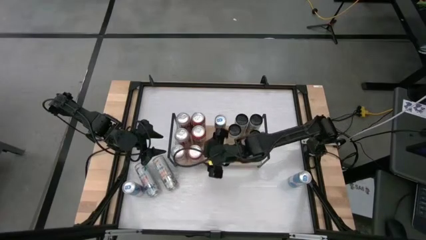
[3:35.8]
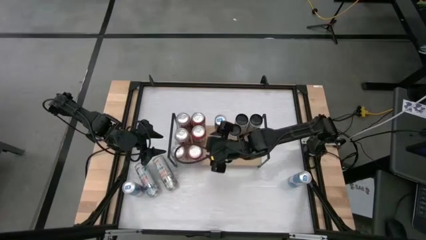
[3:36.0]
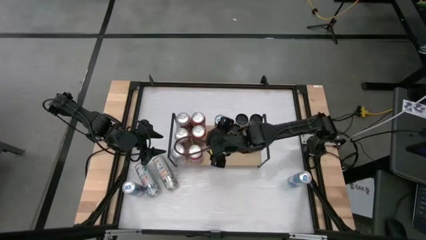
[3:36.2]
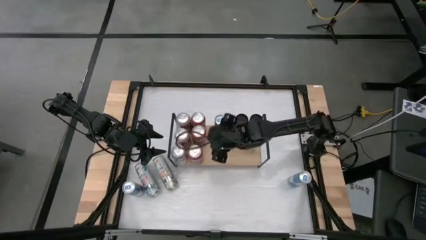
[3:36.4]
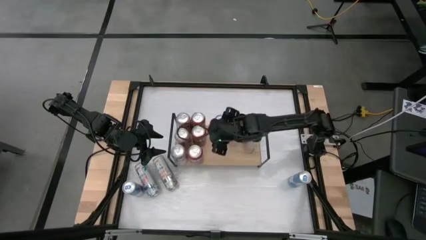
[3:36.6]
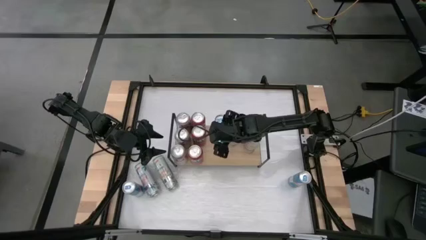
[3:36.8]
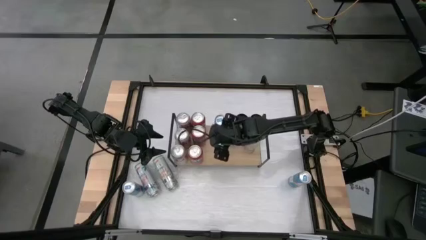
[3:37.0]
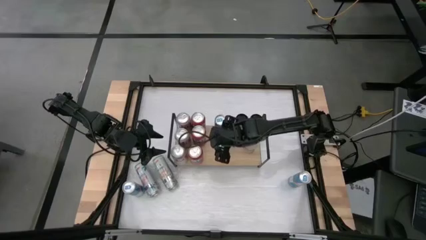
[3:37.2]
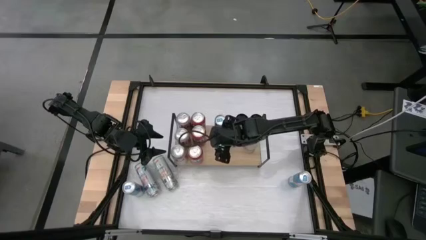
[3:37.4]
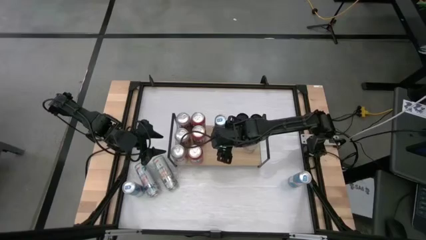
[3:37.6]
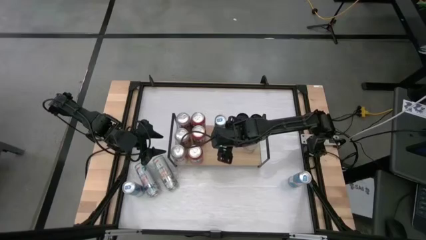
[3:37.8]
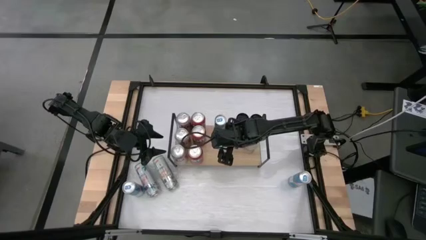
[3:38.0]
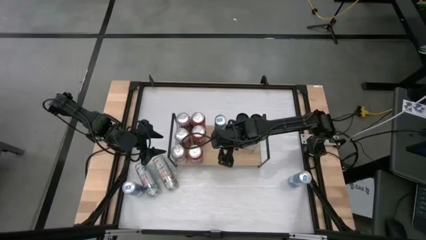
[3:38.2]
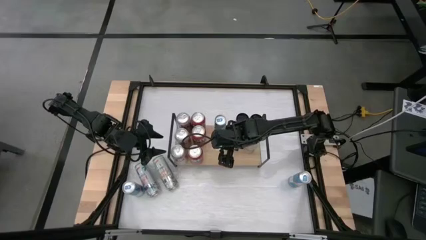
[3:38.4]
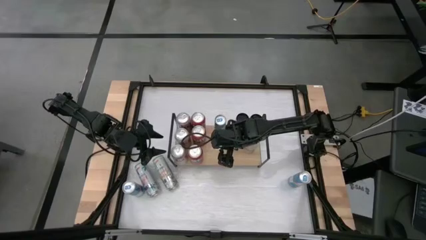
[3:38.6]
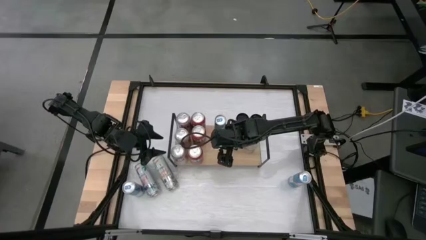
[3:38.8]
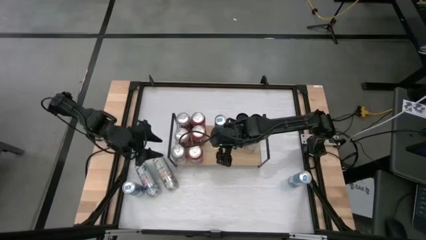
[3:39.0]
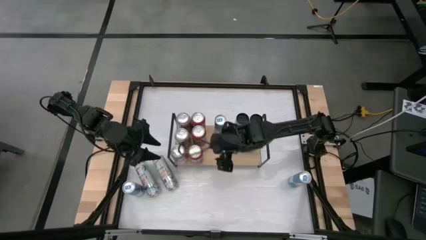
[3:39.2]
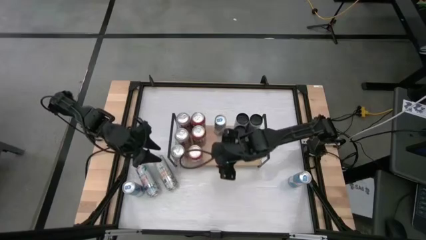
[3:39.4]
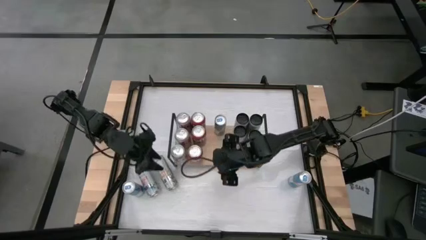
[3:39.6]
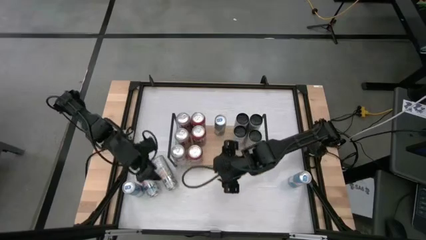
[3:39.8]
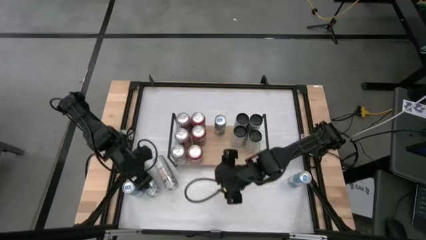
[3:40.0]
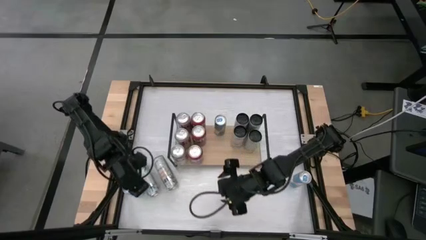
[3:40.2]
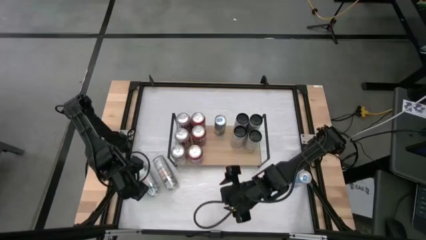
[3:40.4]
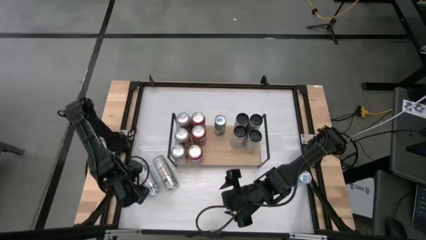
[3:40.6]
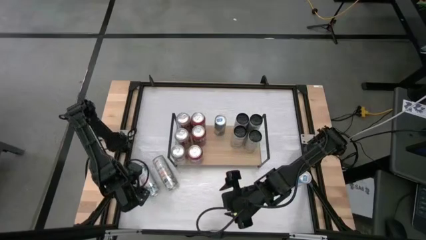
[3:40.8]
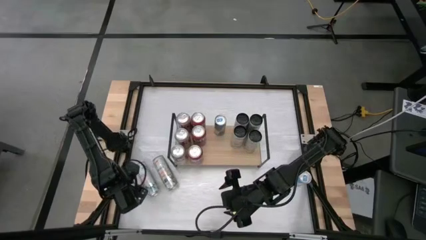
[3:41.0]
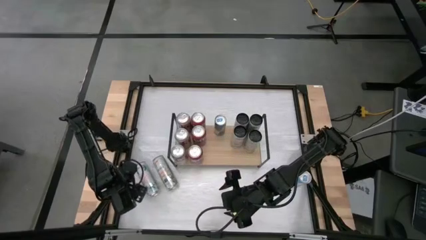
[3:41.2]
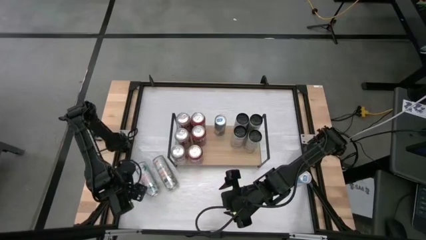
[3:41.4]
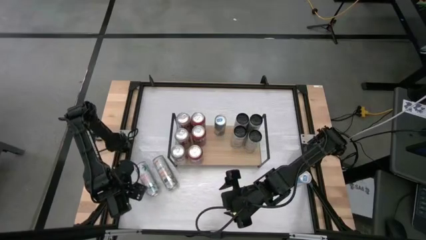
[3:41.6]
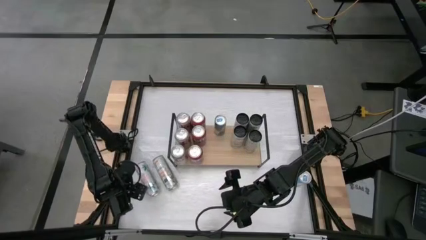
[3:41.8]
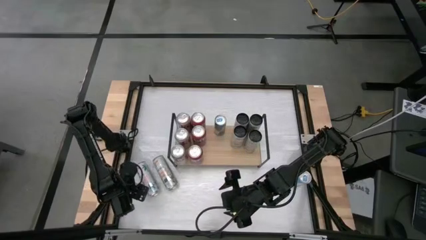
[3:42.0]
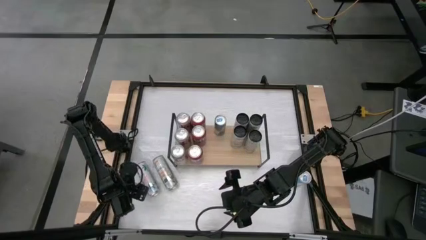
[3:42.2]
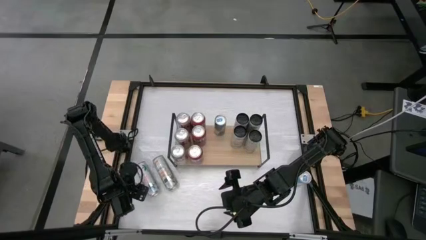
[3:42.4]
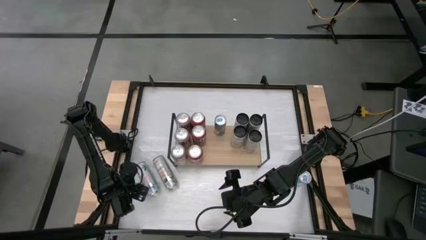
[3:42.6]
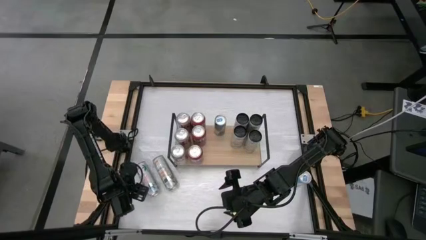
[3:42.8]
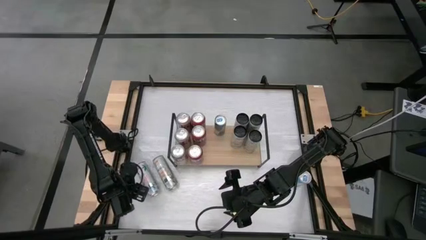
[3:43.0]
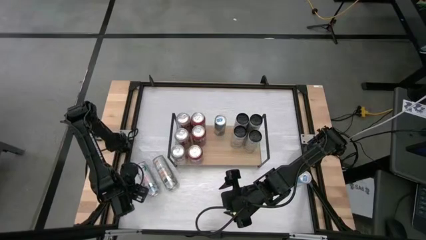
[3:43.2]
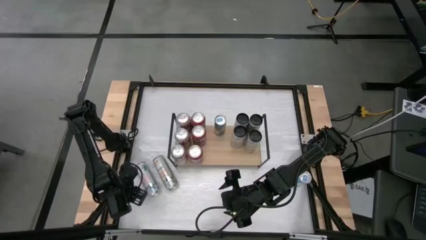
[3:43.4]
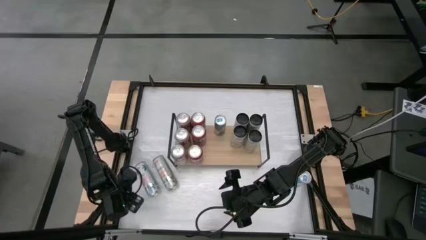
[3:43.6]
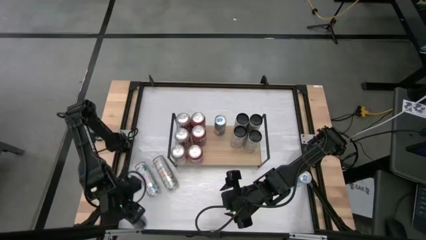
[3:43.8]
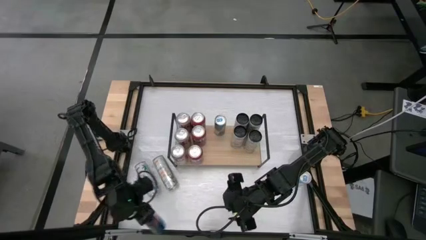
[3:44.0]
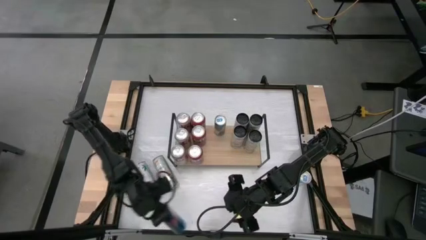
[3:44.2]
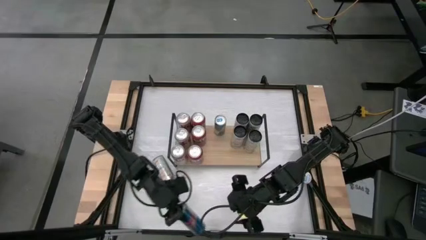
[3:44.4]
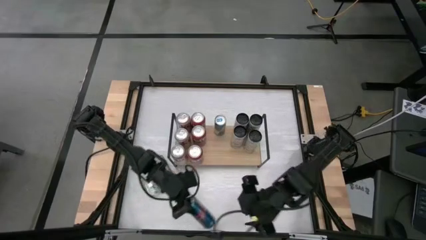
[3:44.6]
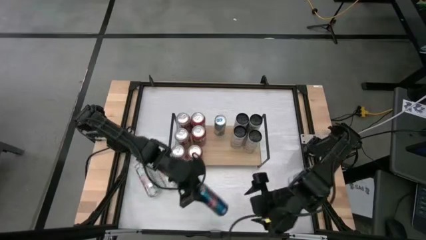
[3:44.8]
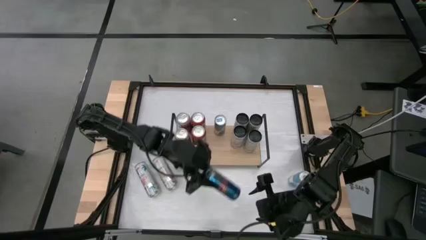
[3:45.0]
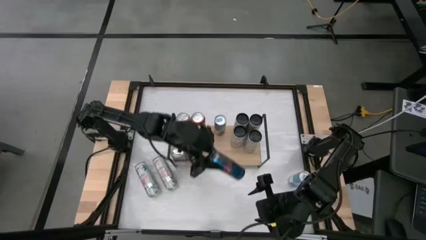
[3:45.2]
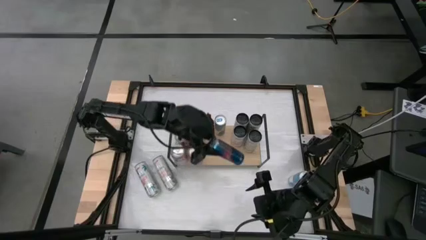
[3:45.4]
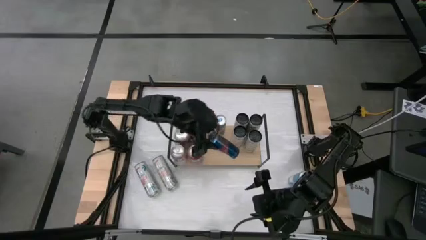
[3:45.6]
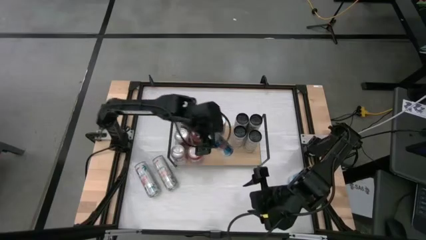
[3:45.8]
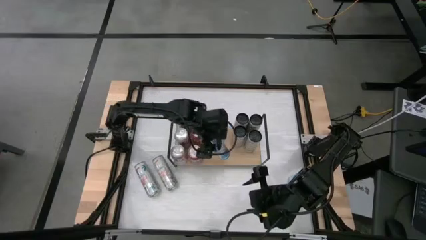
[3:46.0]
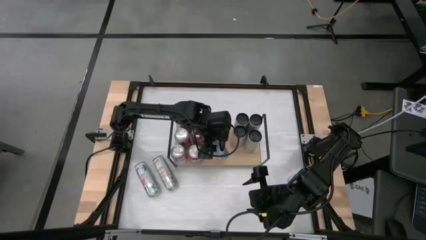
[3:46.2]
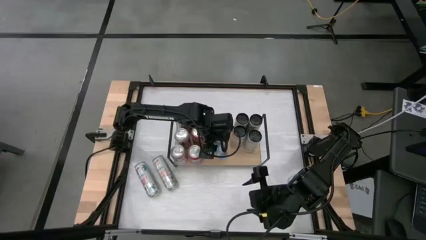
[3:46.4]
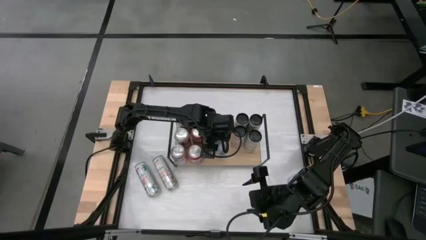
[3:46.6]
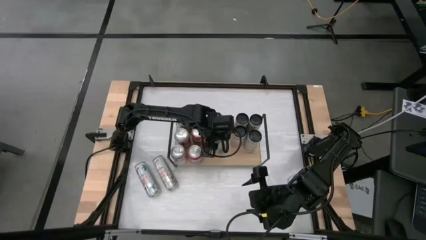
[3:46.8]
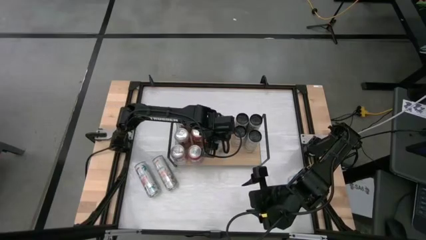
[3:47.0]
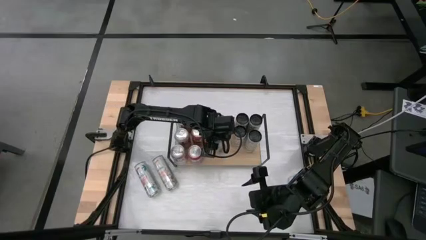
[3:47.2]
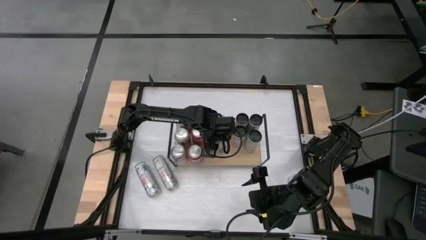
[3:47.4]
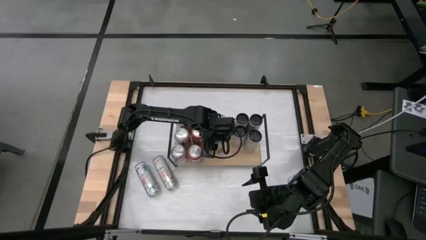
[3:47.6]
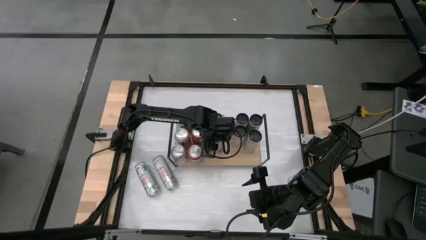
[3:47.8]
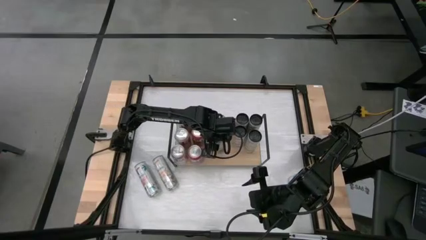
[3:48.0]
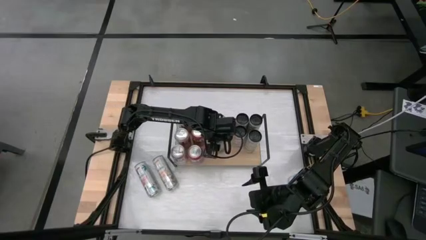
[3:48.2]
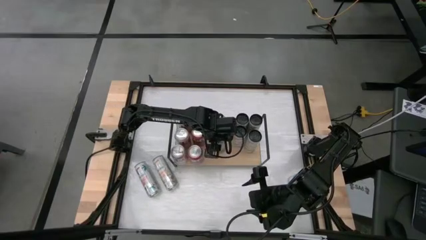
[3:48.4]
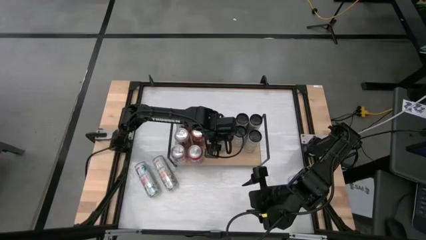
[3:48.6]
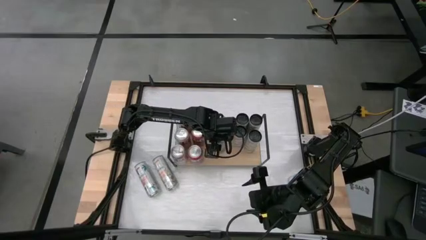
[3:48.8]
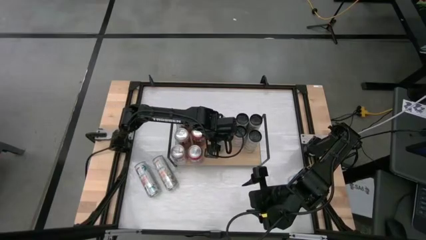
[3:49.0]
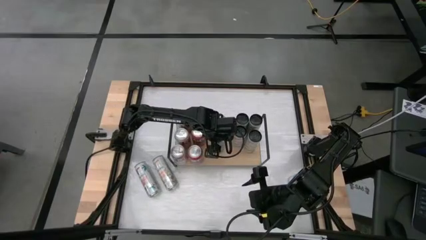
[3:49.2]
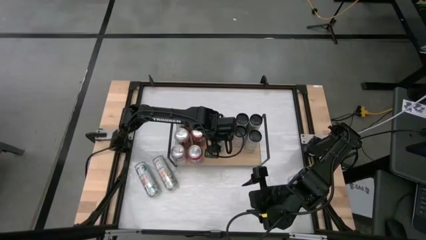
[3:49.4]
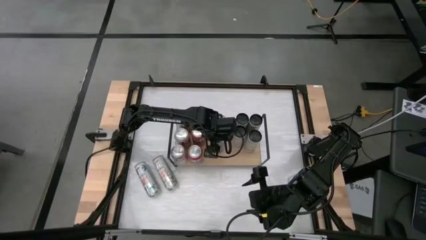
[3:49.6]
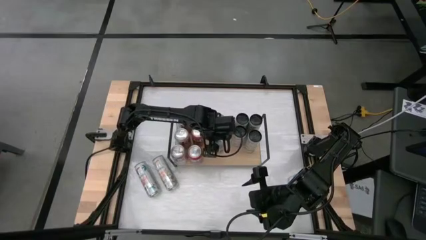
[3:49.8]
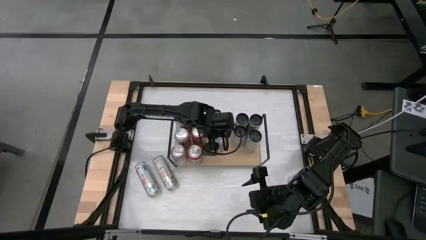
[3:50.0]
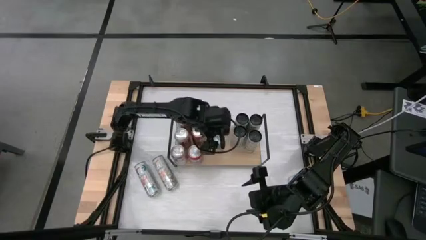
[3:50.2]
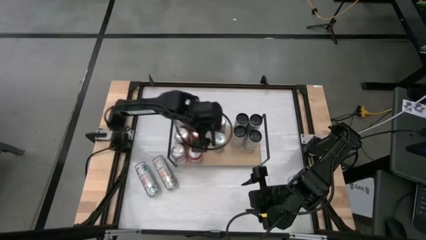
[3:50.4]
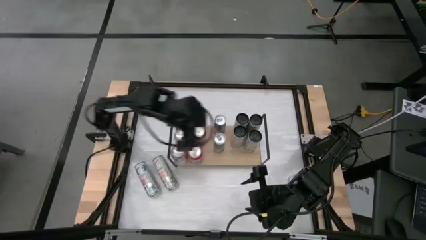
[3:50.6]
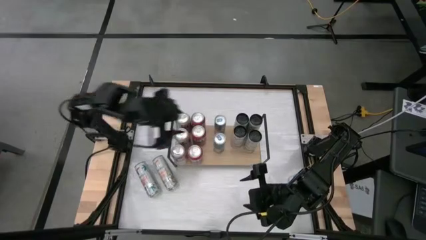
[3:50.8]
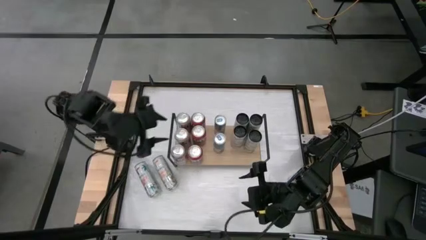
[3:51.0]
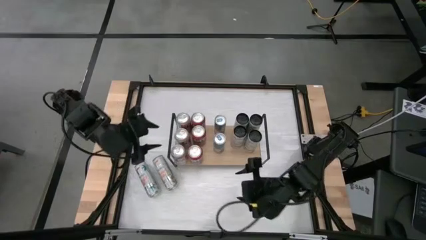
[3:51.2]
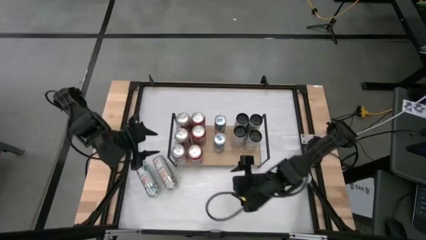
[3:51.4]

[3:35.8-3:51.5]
Task: Place canned beverage on shelf
Put the left blue soda can on the shelf and align with the other soda cans
